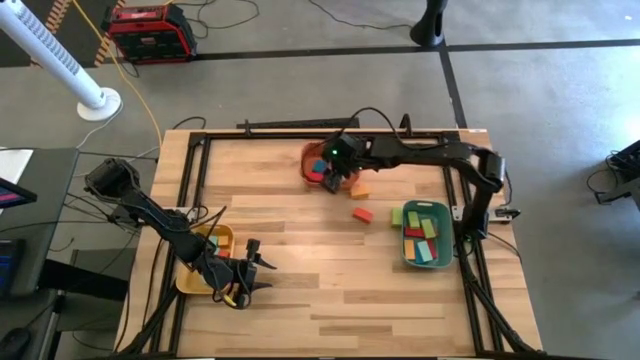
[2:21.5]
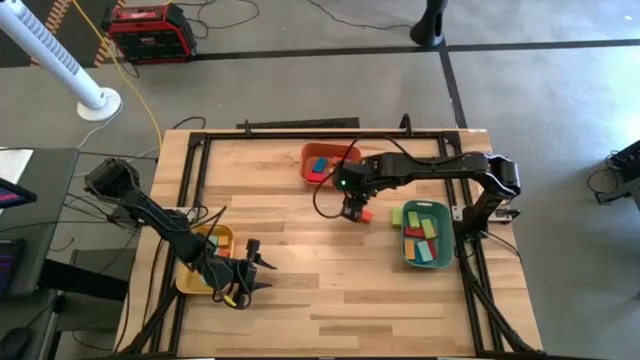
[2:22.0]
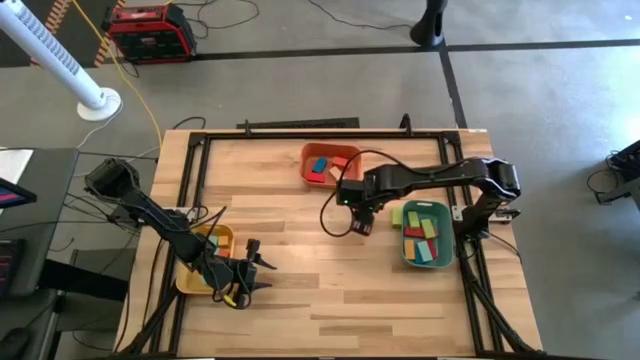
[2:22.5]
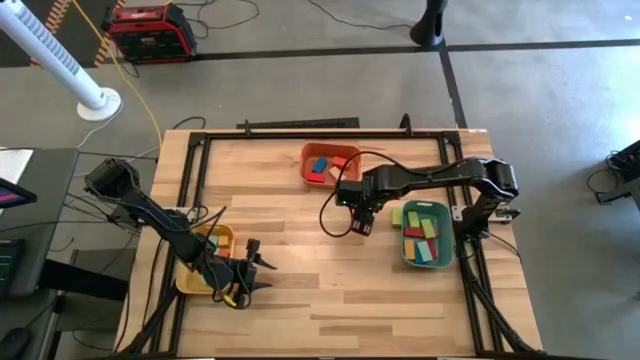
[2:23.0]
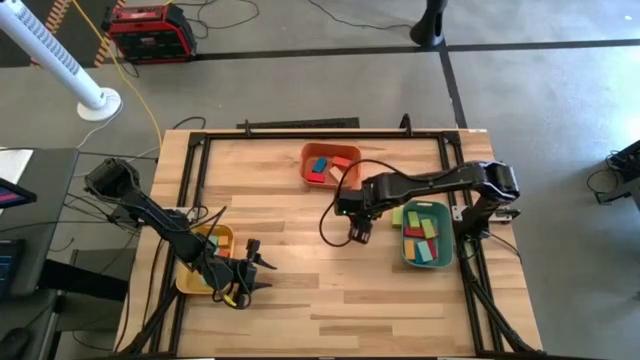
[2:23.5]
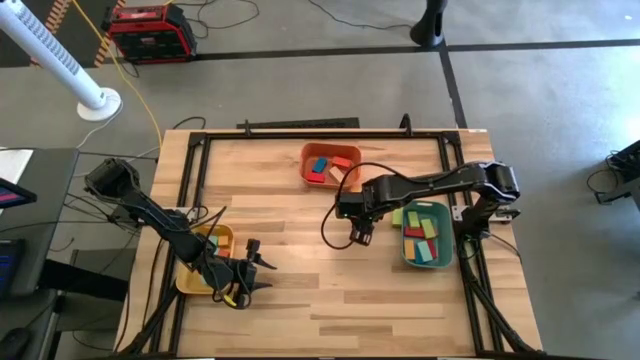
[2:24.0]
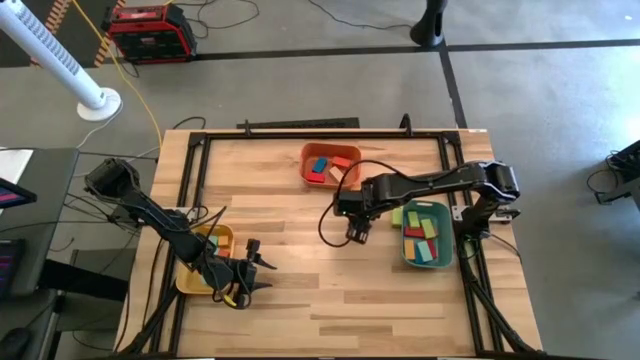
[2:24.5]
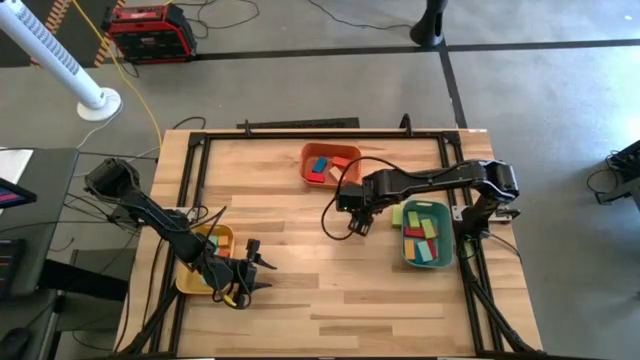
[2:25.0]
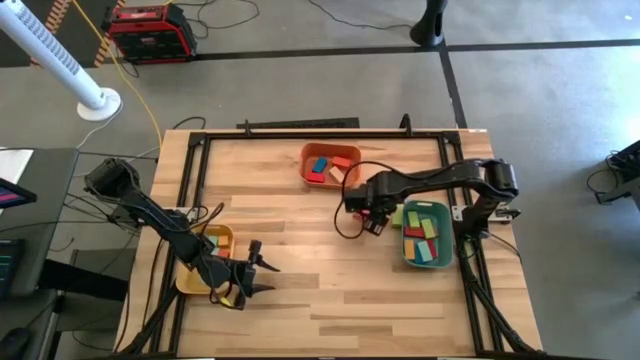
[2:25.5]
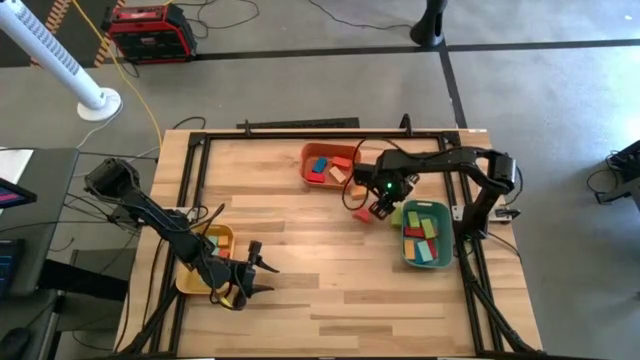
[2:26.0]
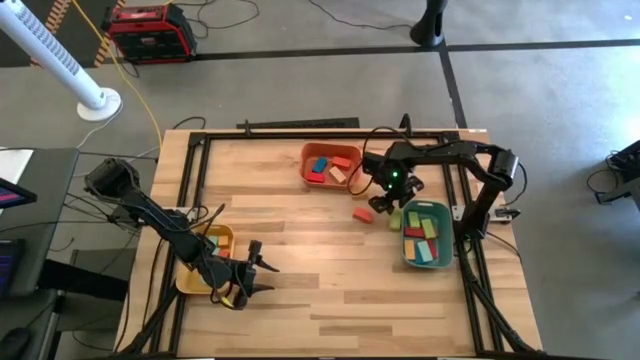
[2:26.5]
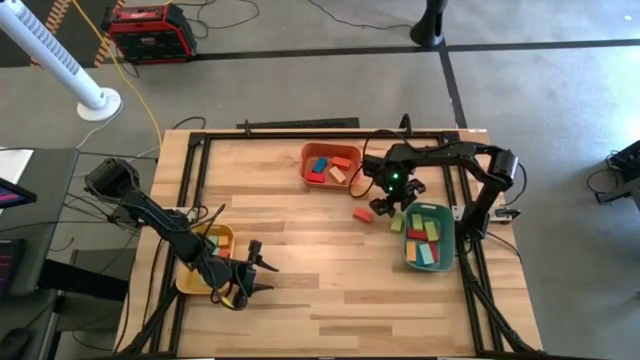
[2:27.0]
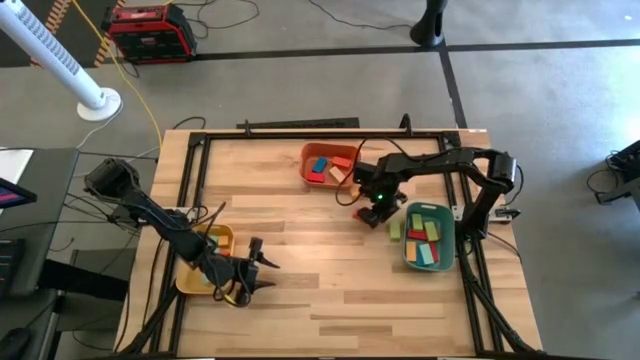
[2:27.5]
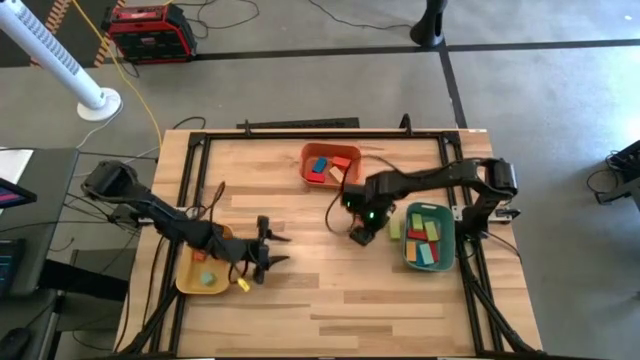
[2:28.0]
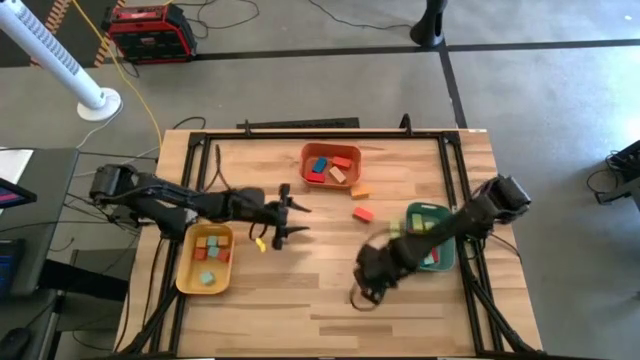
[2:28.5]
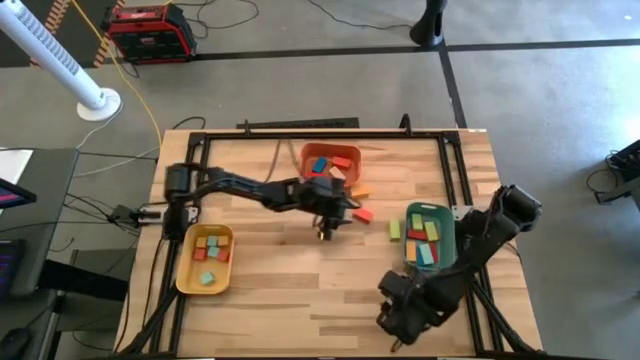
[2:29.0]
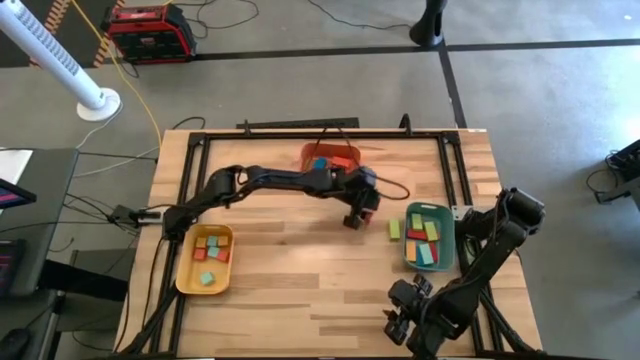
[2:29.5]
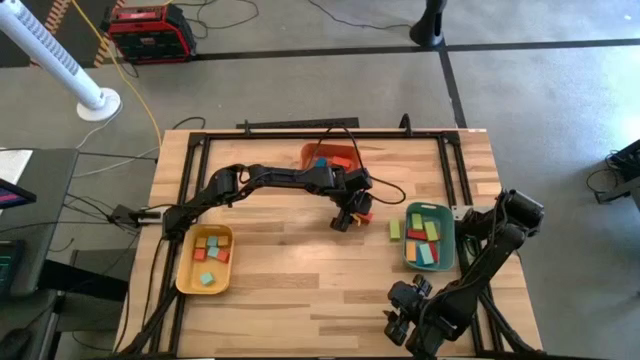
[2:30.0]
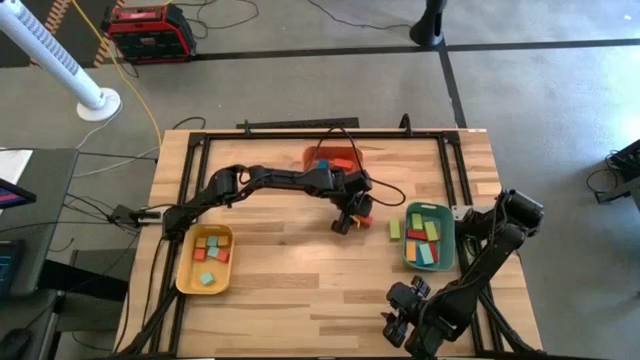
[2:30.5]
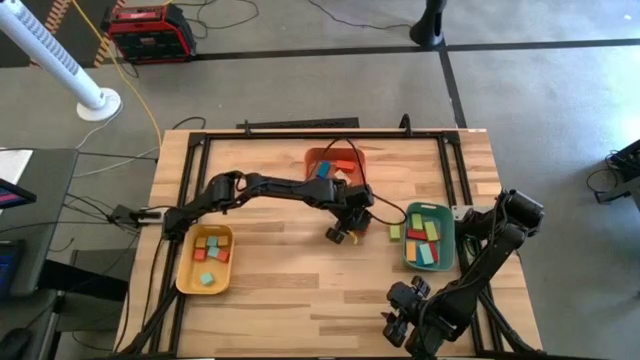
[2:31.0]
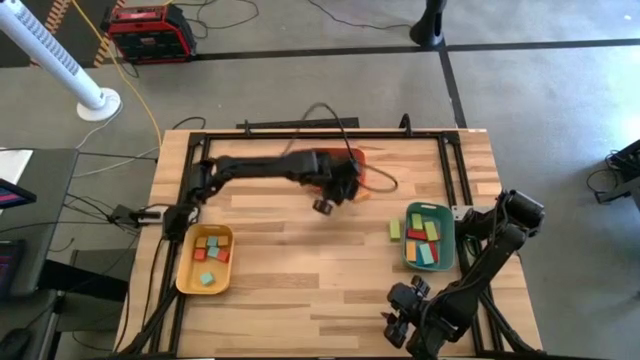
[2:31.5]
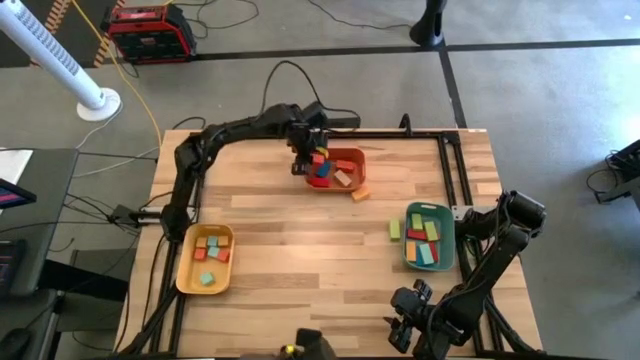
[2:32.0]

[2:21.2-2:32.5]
Task: Sort blocks by size
Put the large orange block into the orange bin

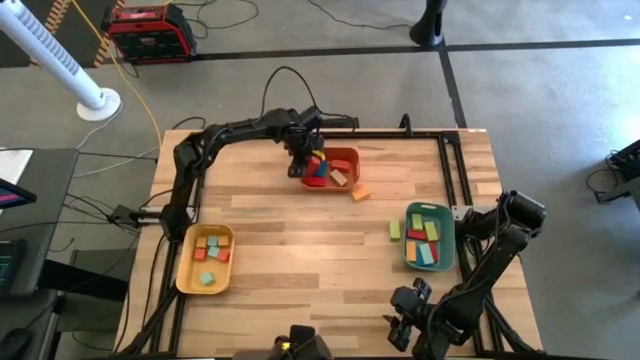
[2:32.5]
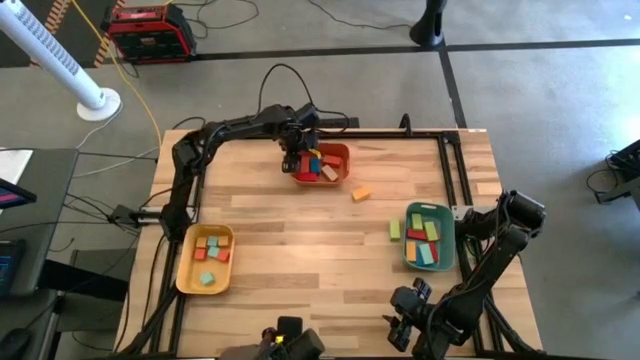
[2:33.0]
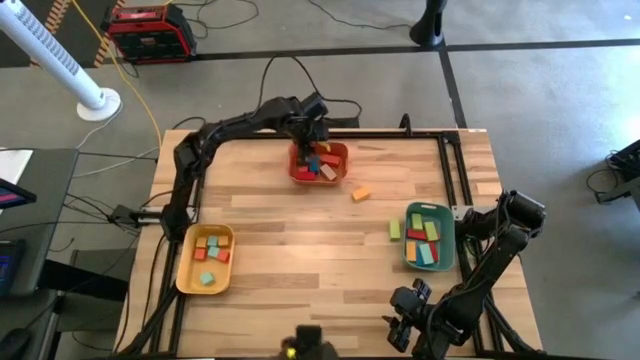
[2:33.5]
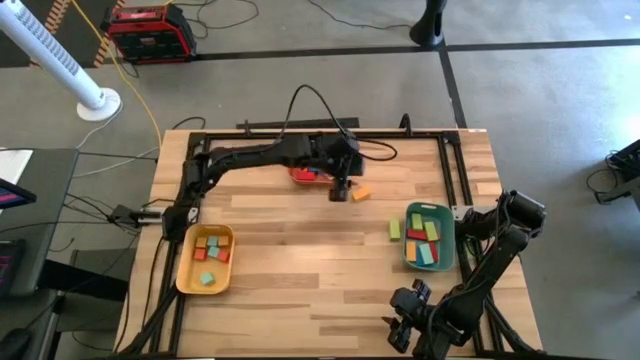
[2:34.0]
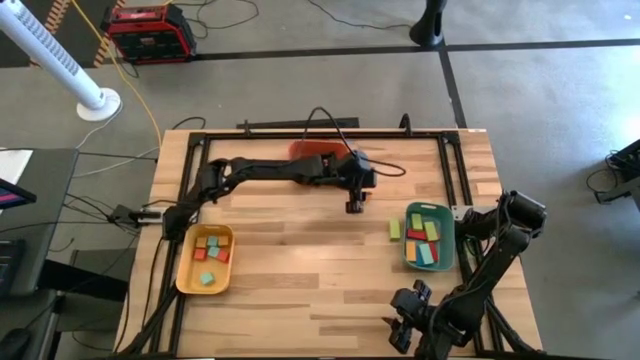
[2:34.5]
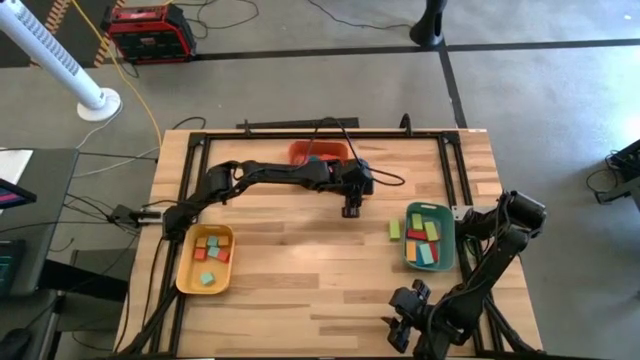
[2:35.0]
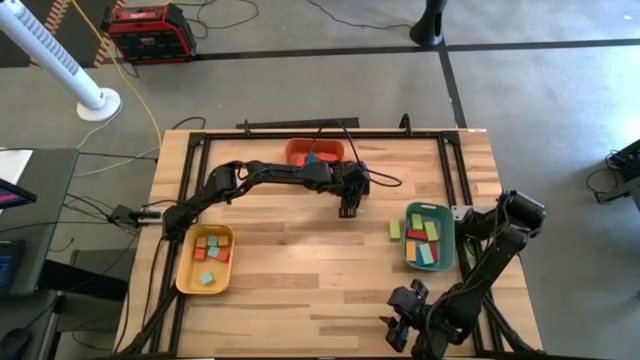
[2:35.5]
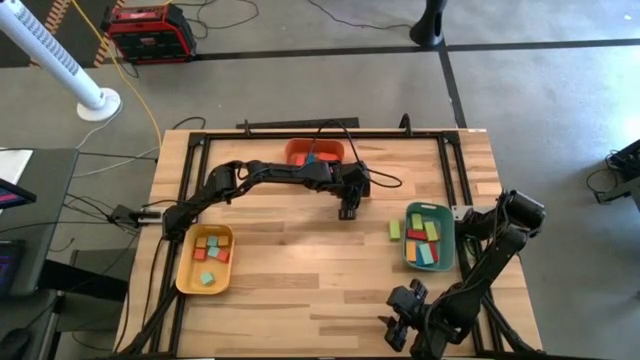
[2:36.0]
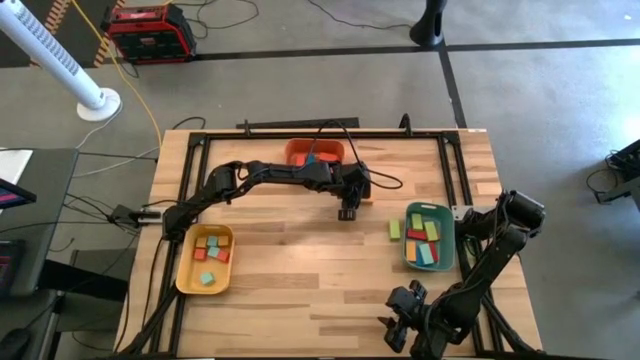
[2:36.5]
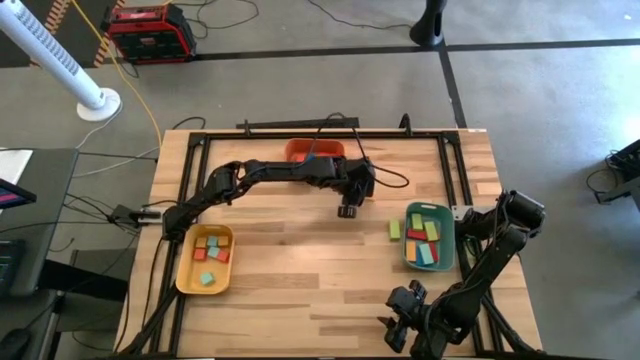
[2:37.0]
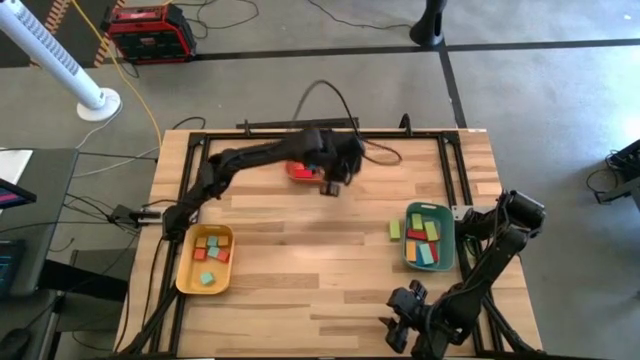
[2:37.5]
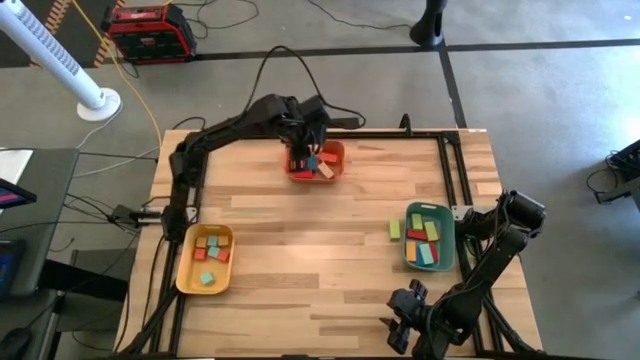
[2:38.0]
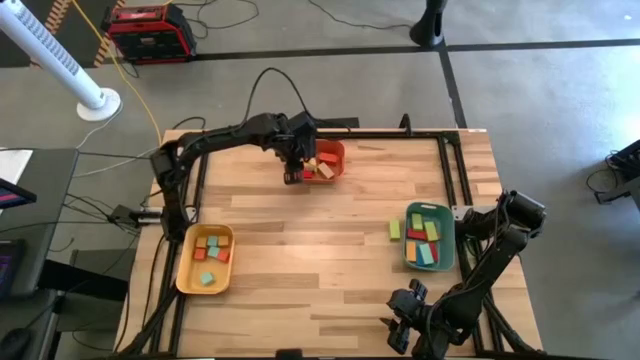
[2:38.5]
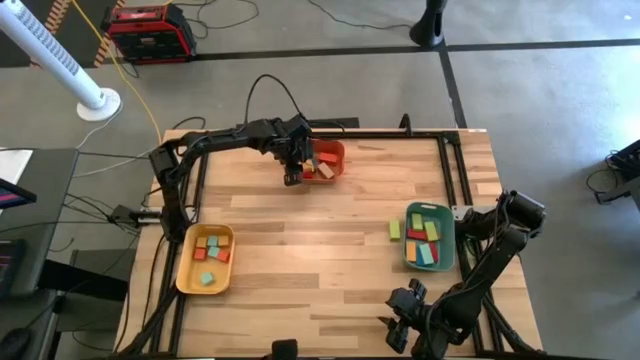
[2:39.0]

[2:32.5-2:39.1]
Put the large yellow block into the orange bin

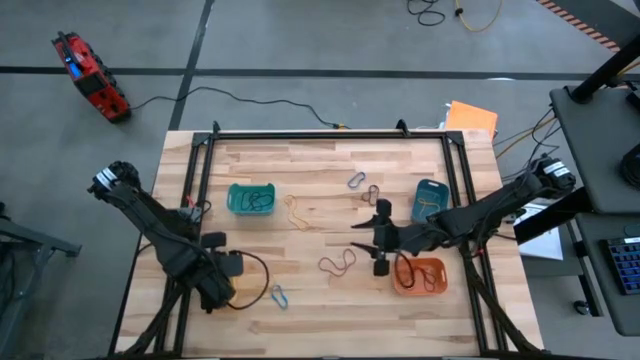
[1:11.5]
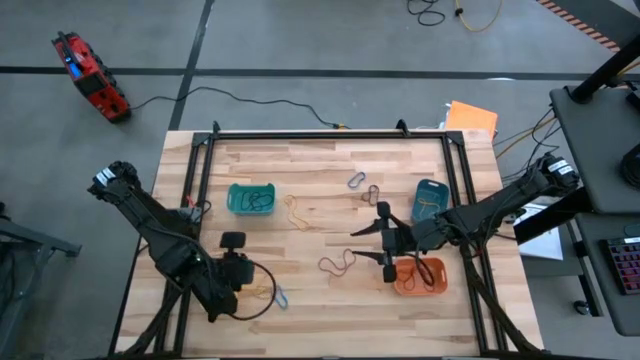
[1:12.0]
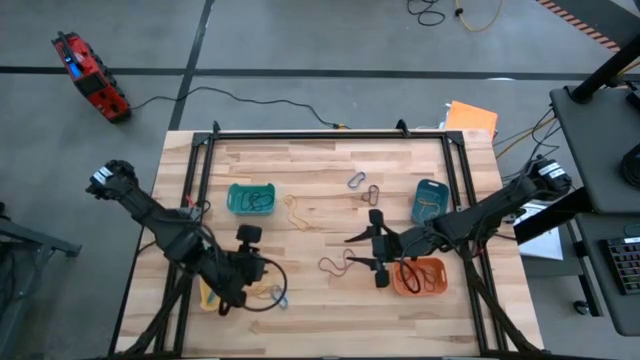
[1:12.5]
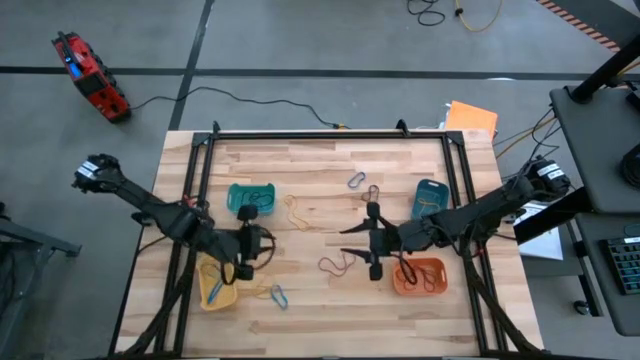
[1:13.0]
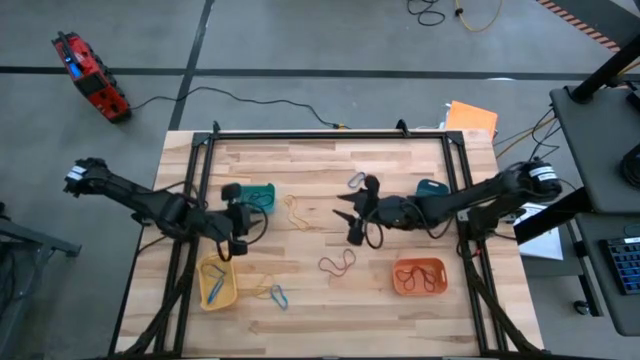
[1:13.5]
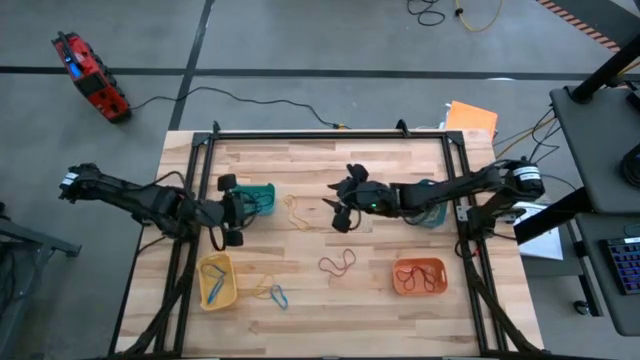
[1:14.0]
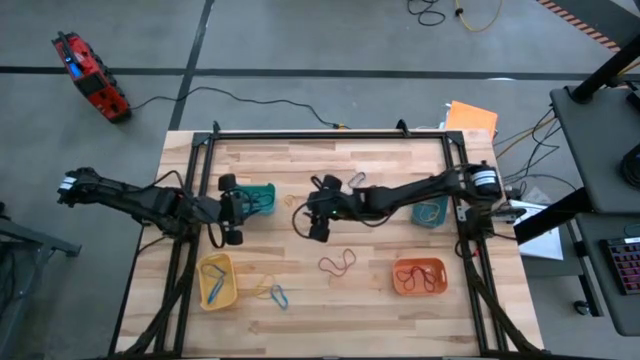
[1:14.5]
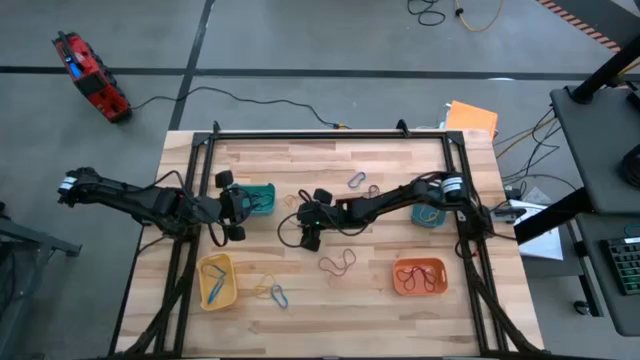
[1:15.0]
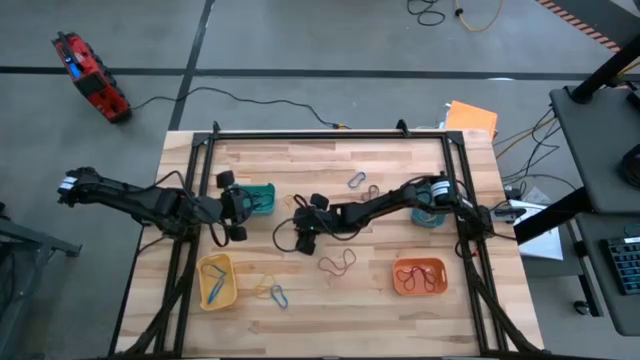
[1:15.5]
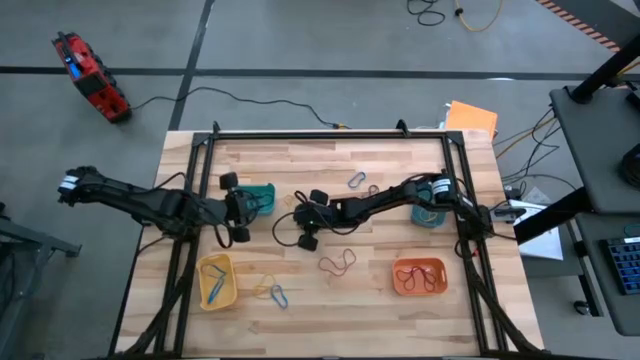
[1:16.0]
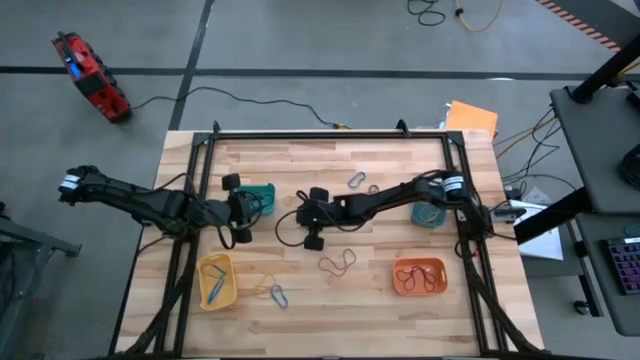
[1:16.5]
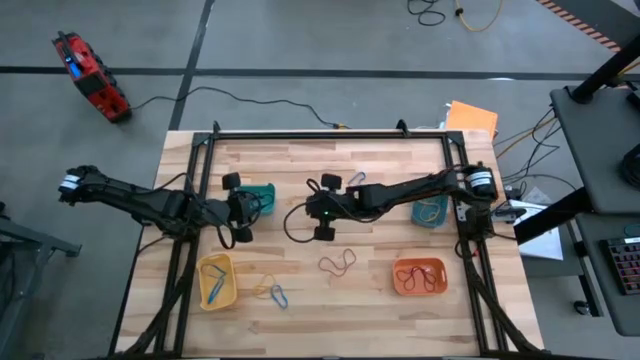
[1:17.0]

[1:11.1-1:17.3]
Task: Sort rubber bands into baskets
Put the yellow rubber band into the blue bin
